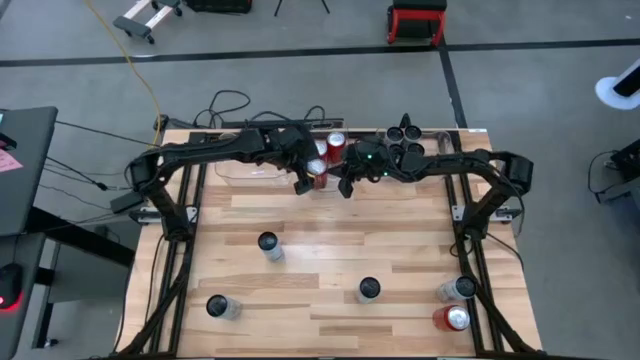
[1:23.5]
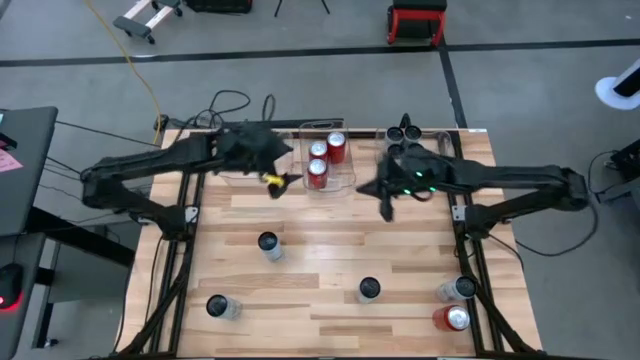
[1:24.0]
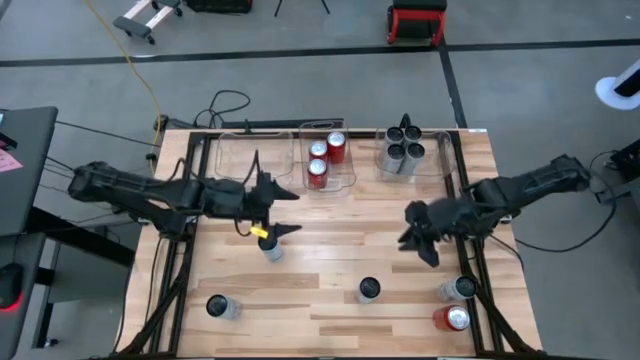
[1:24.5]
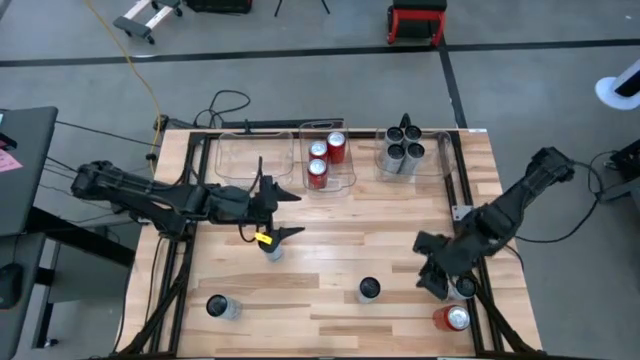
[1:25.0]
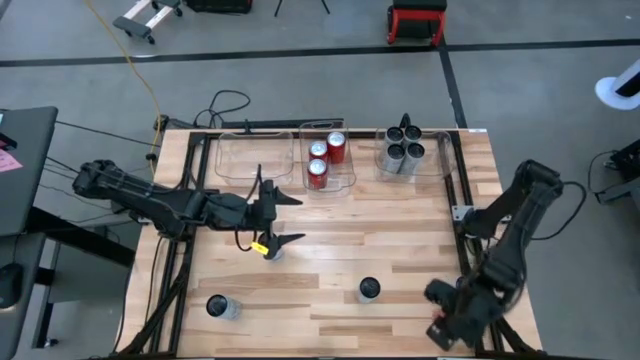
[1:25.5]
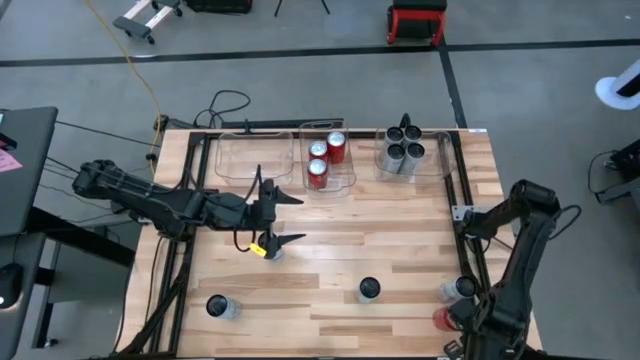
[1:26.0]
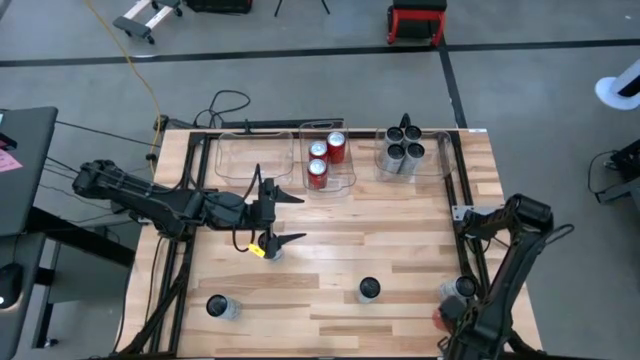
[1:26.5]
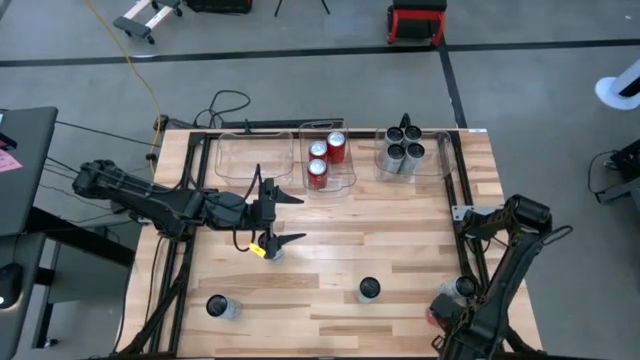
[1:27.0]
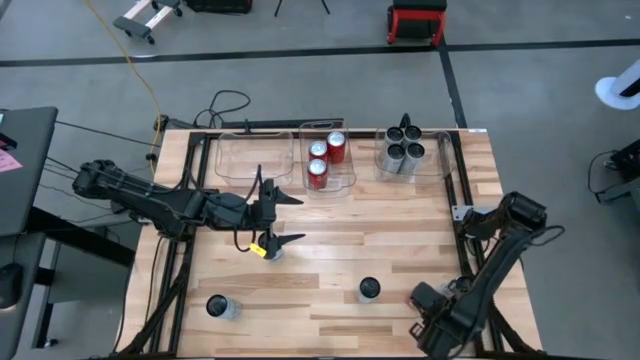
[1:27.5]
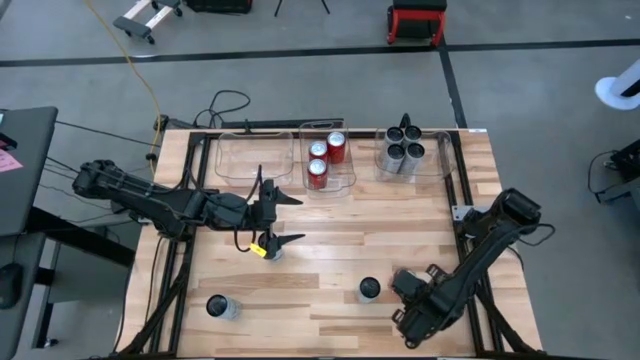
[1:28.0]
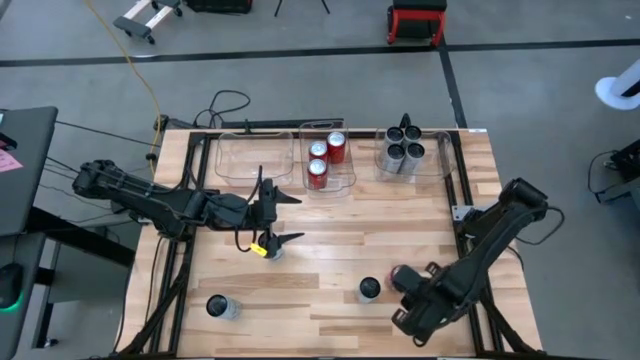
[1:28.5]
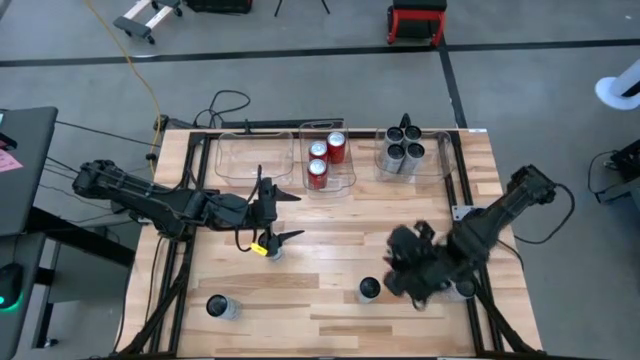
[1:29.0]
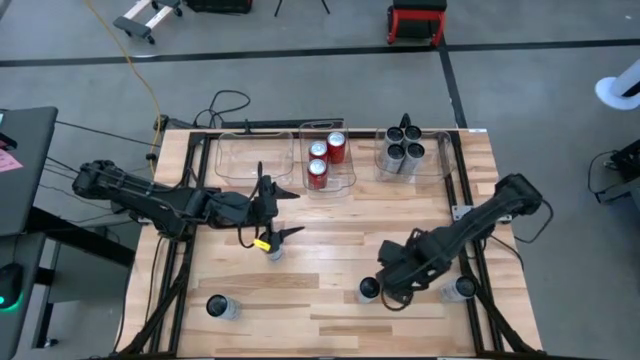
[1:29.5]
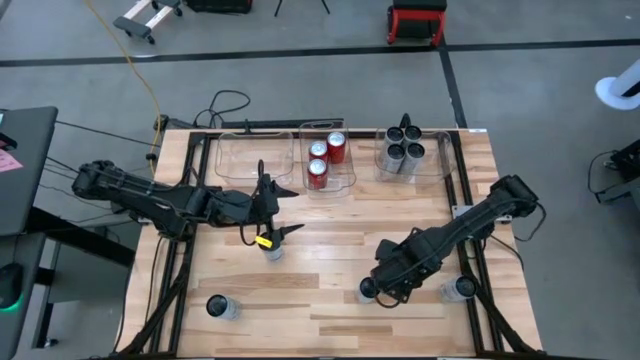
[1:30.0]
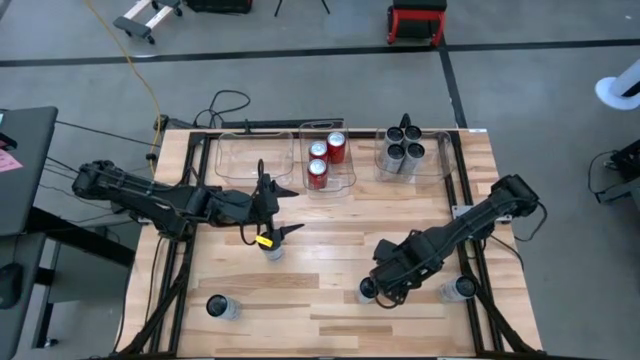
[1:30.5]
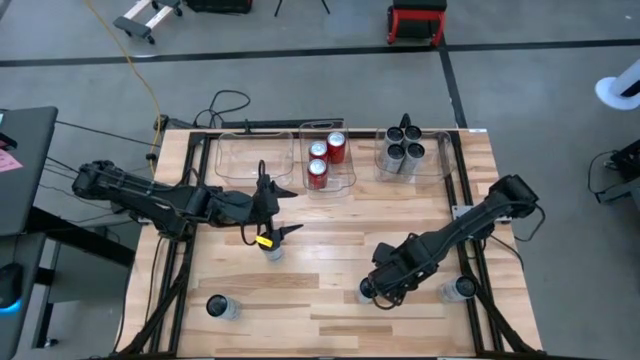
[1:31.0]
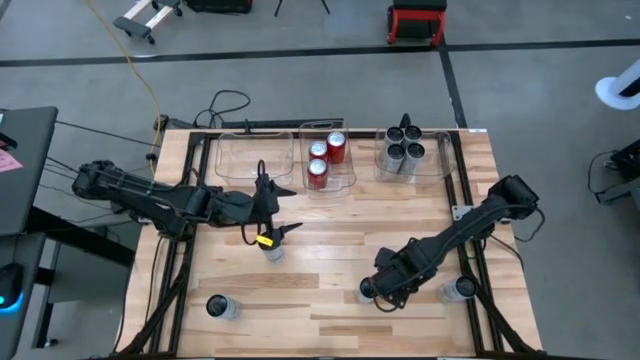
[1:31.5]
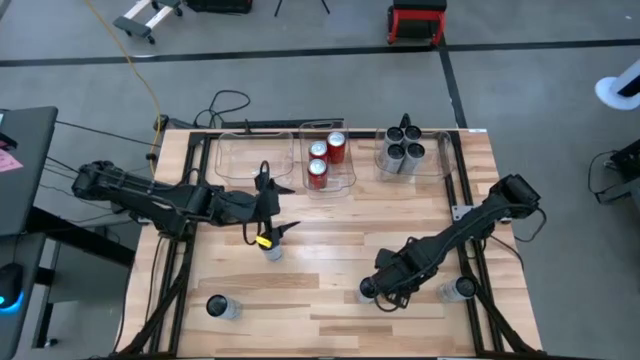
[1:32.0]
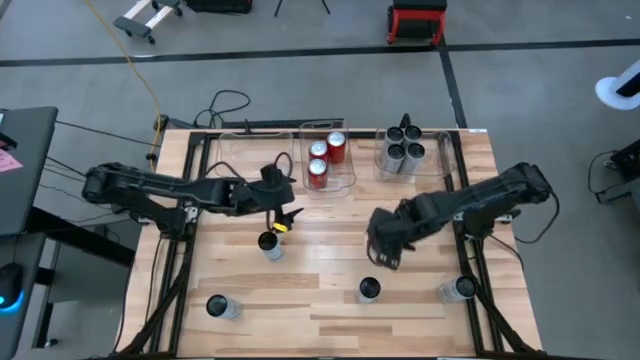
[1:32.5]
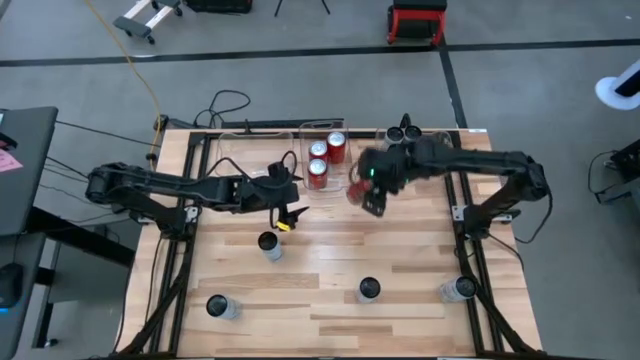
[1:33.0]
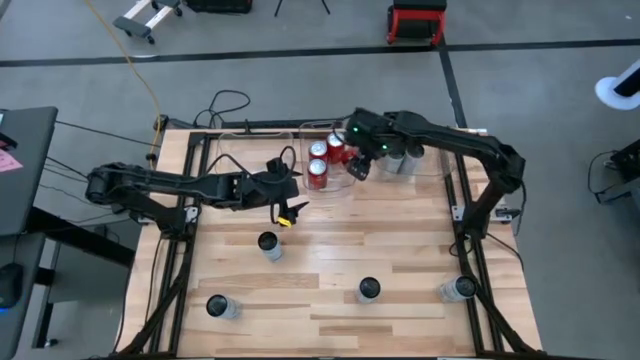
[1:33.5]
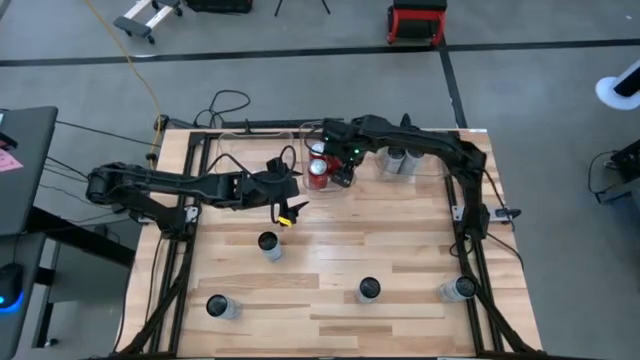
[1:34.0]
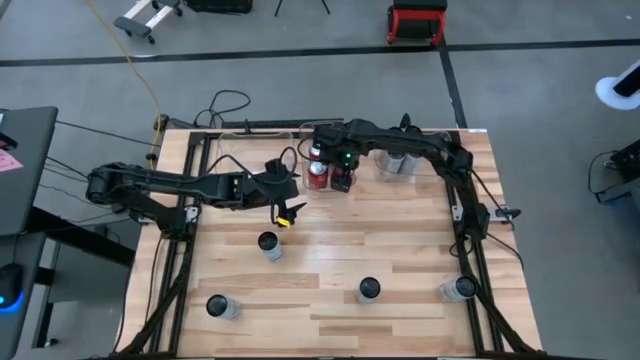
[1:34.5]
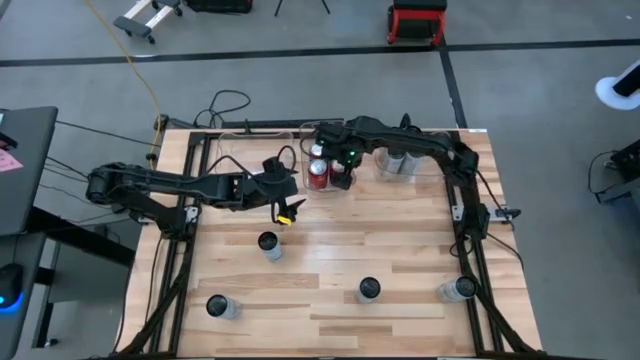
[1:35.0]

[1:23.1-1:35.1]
Task: Sort soda cans
Put the red-black soda can into the middle transparent bin

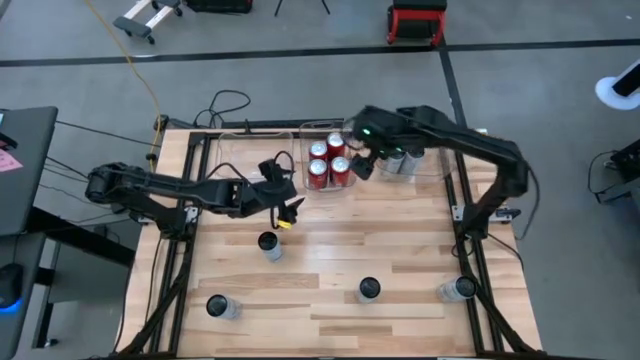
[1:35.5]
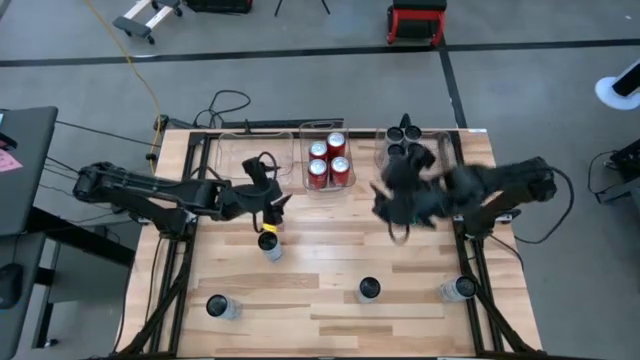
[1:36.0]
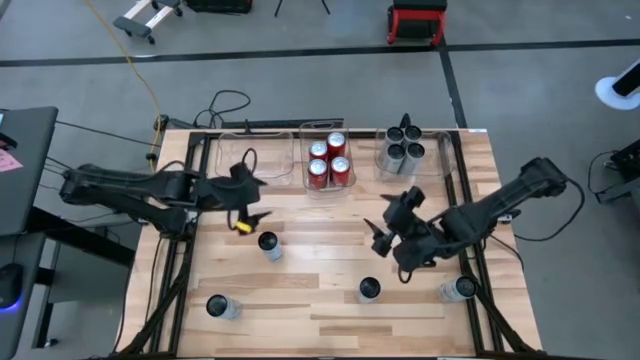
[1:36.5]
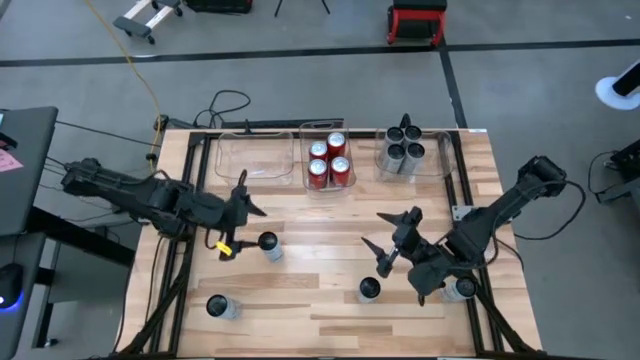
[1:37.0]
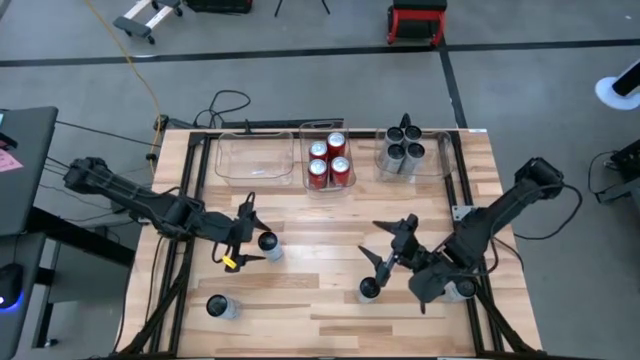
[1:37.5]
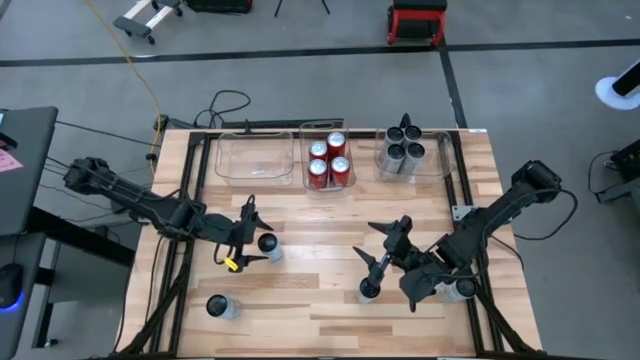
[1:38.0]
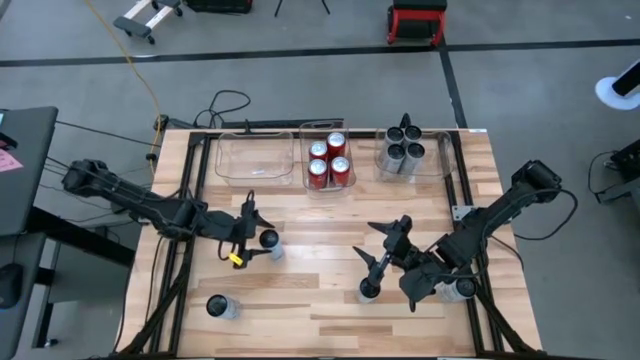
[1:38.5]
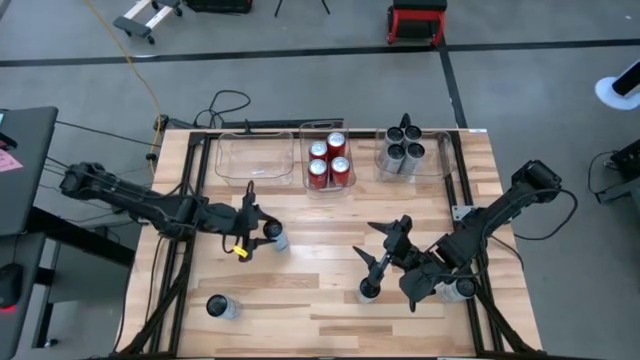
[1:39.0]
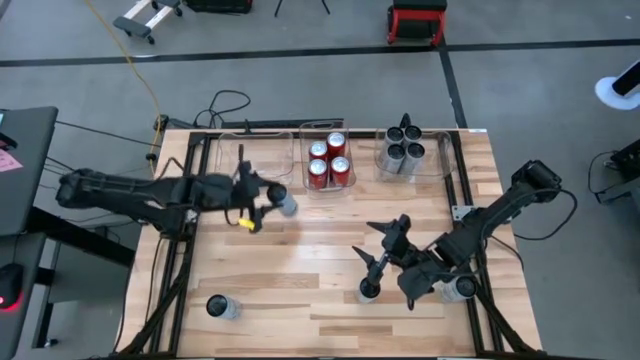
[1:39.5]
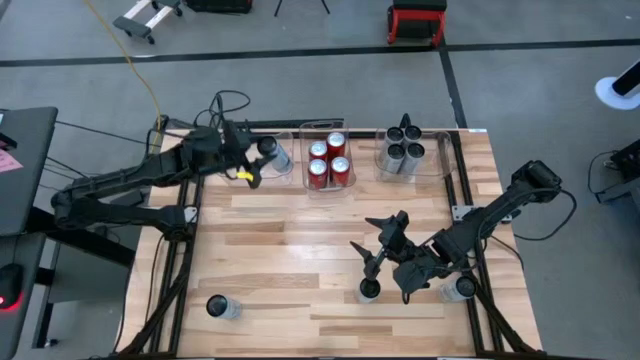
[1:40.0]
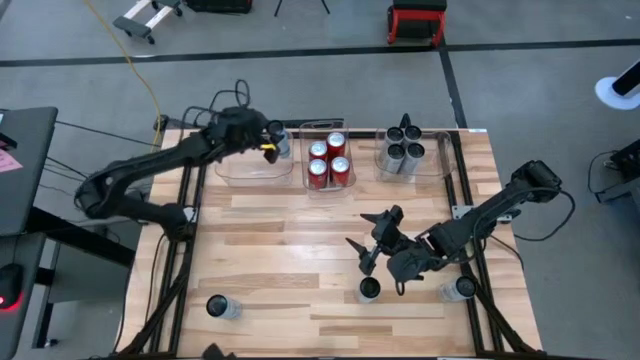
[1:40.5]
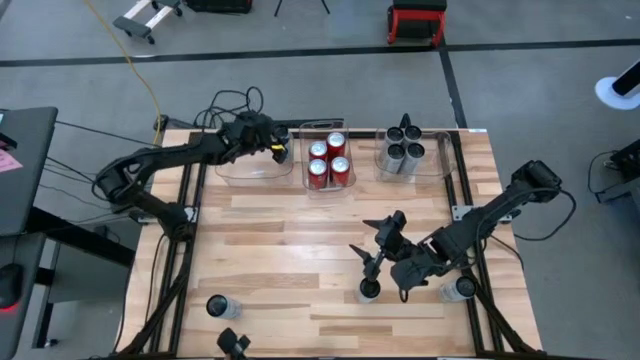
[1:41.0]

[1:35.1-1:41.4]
Put the white-blue soda can into the left transparent bin
